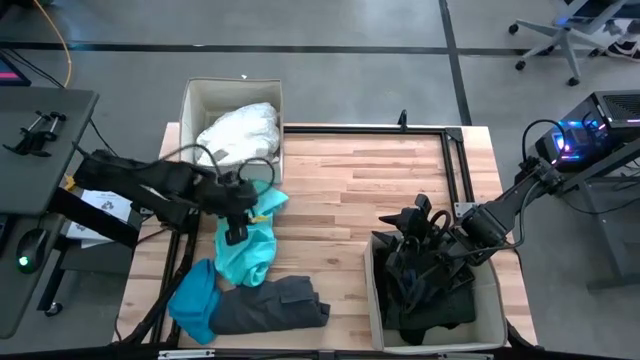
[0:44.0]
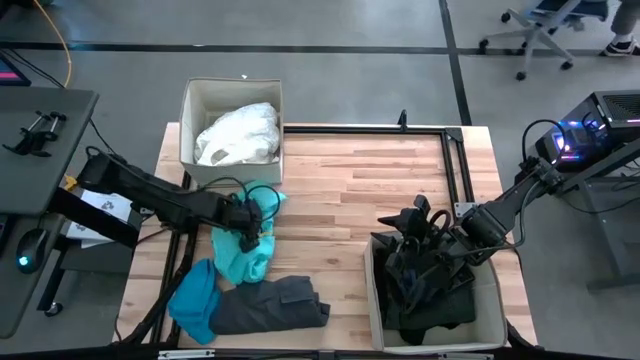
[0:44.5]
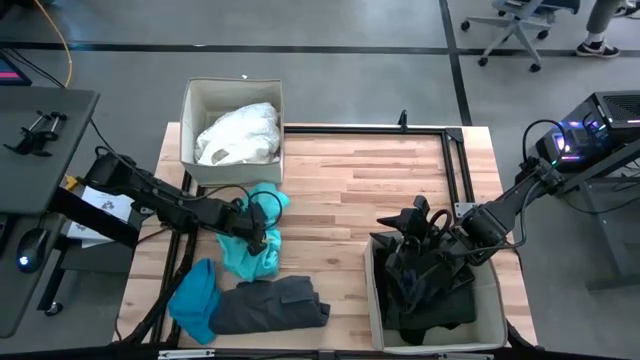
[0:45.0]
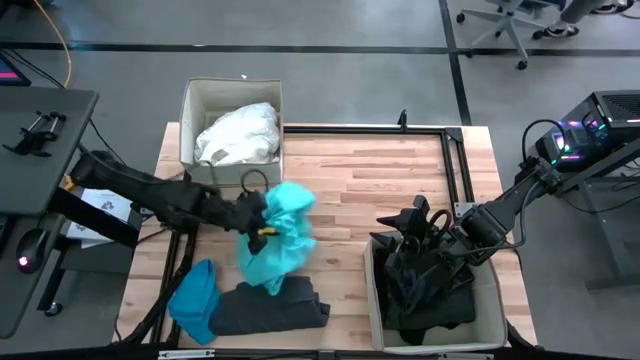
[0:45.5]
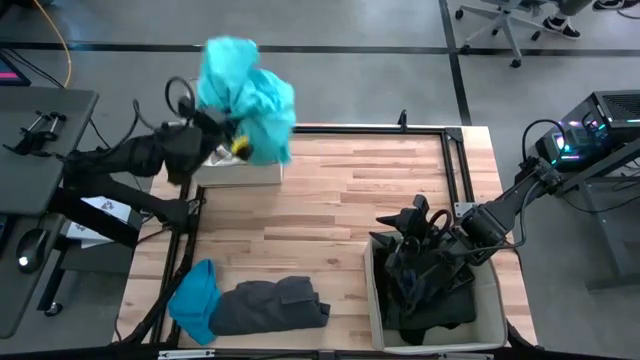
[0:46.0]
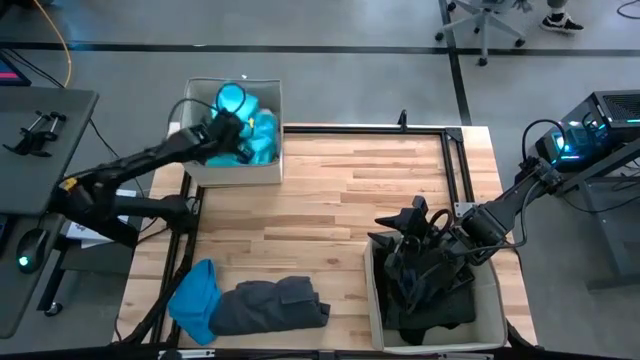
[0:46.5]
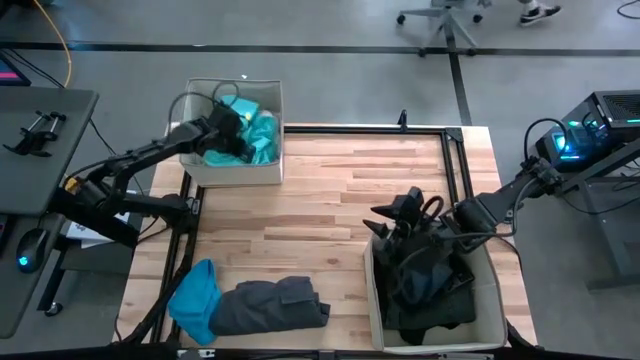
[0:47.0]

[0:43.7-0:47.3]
Task: Sort clothes
Put the light blue shorts into the top laundry organizer

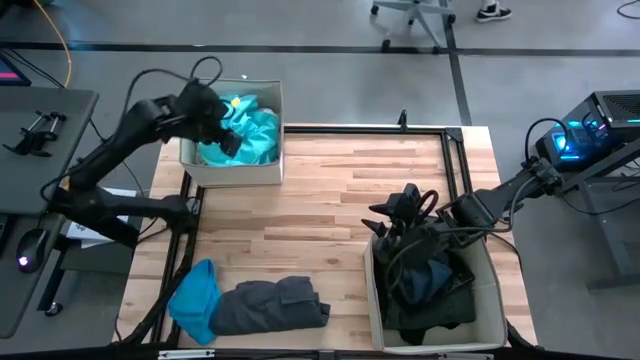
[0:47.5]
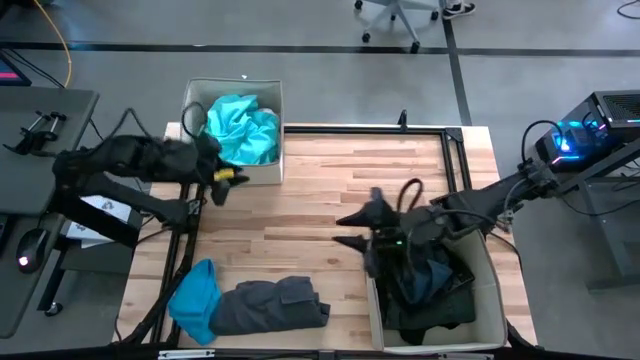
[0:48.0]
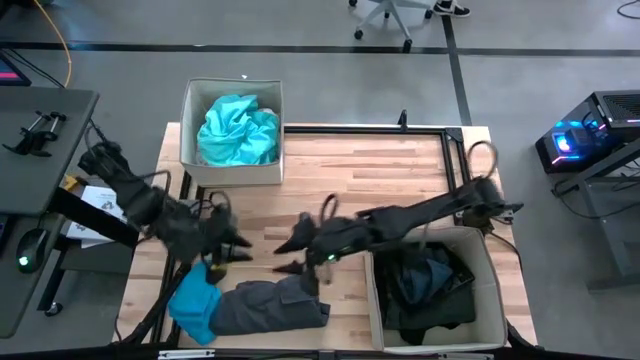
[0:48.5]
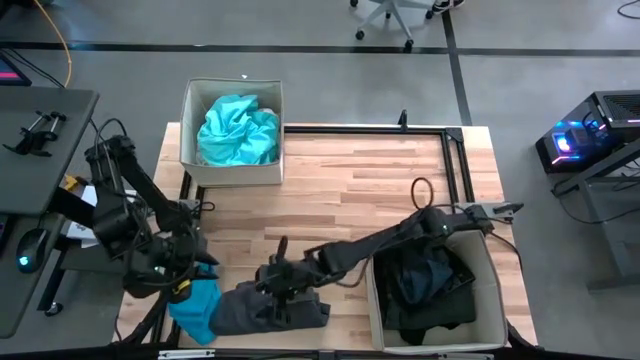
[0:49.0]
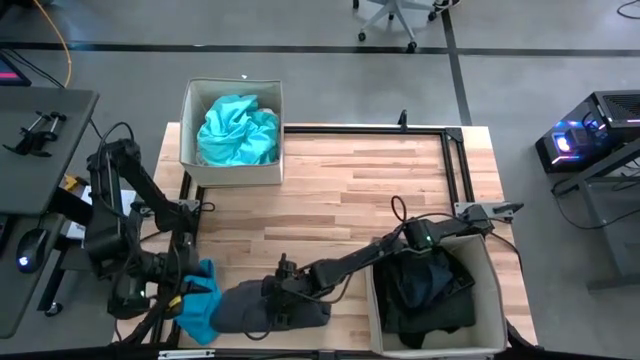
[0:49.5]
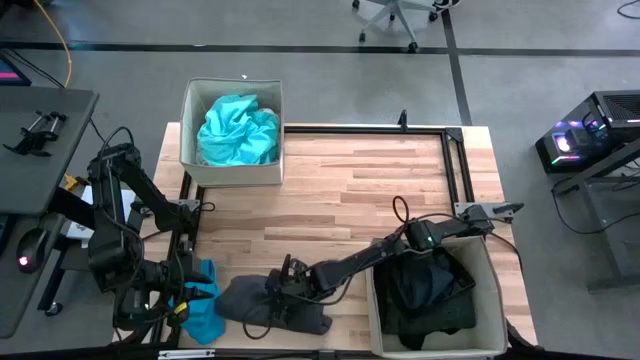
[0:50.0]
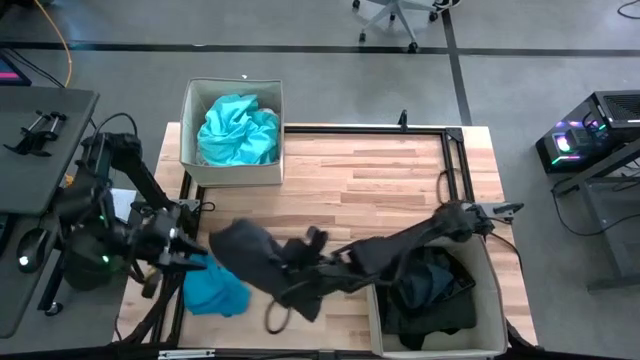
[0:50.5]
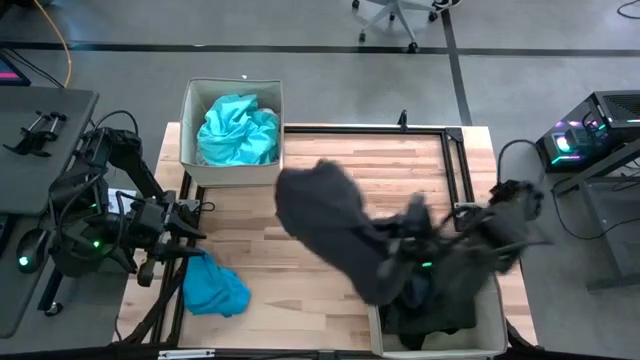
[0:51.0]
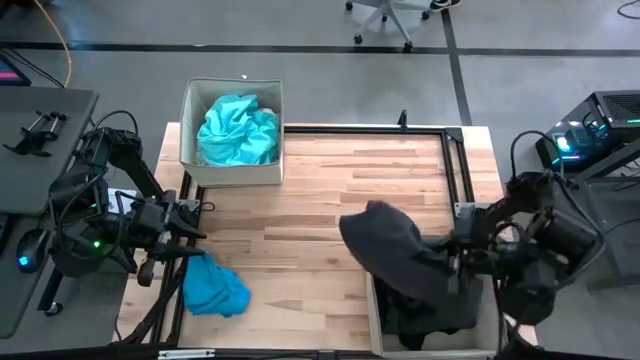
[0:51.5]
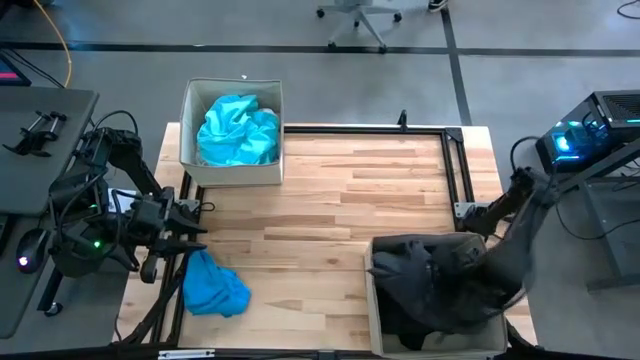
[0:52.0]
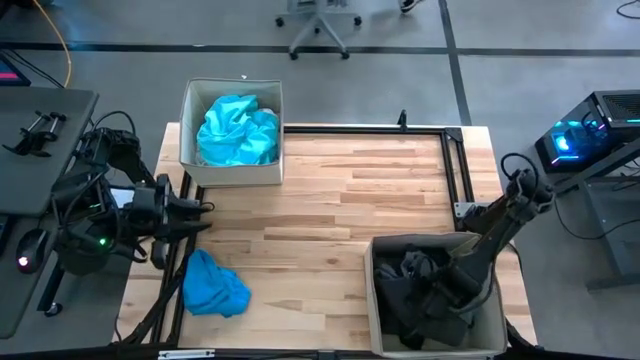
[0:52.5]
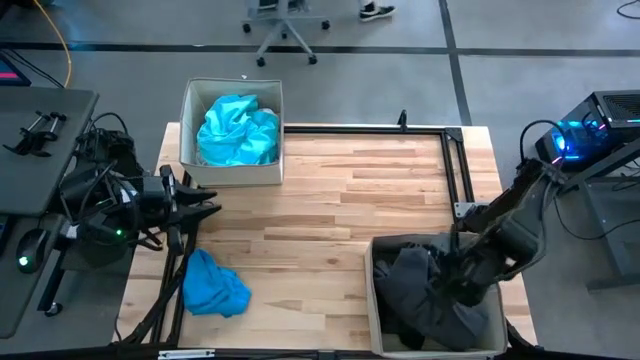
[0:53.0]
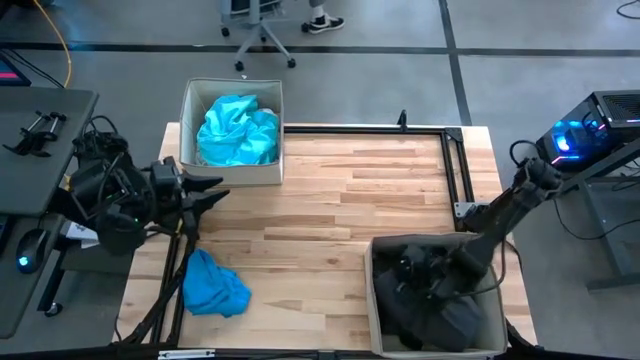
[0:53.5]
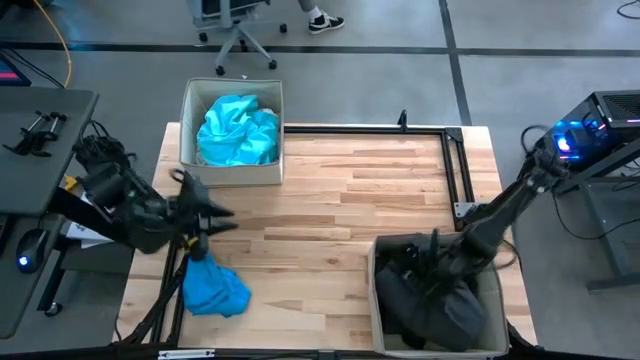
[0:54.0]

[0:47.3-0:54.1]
Put the gray pants into the bottom laundry organizer

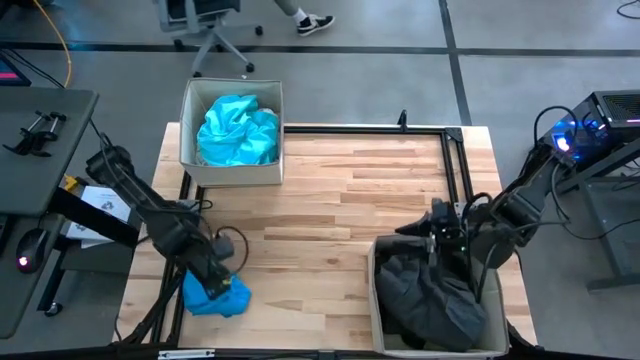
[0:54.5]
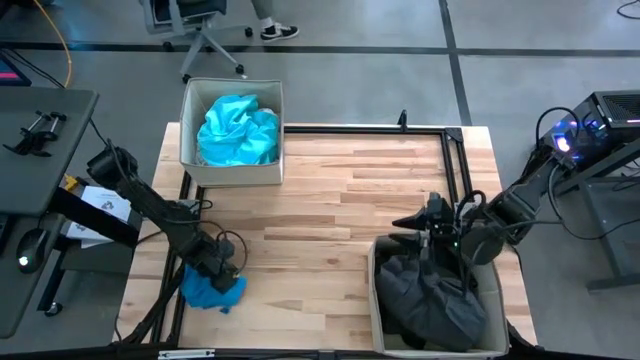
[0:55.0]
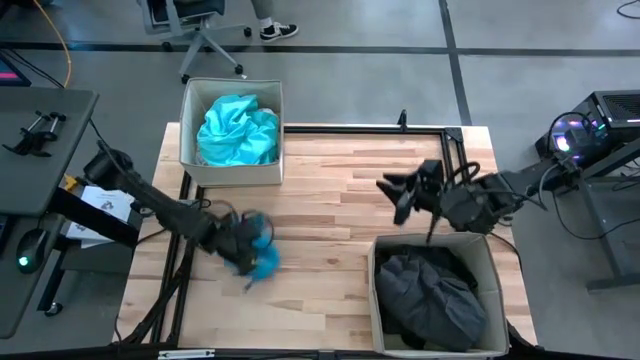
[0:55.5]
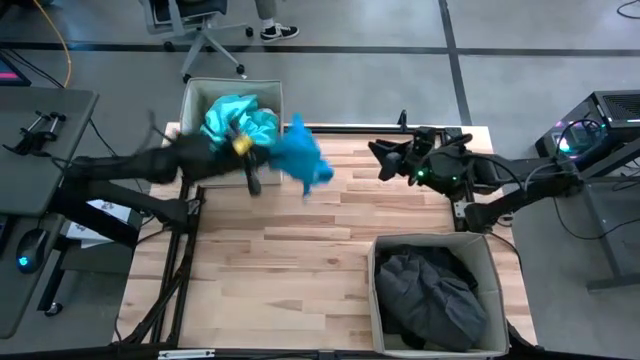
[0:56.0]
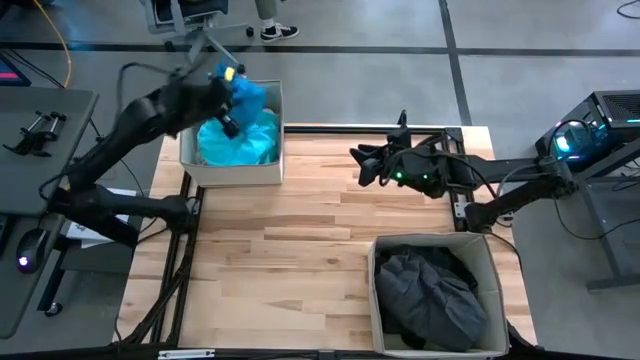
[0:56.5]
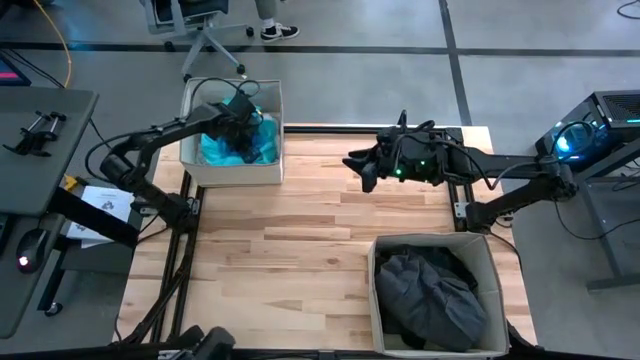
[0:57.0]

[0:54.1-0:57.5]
Put the dark blue shorts into the top laundry organizer

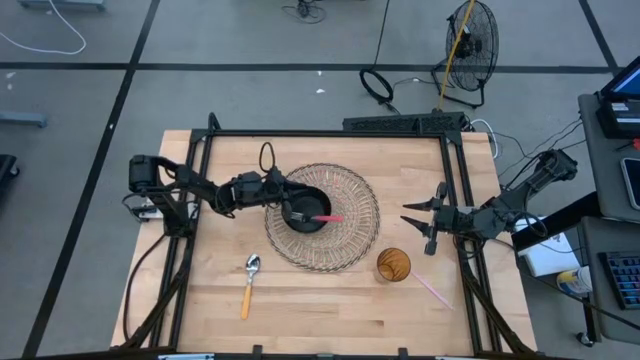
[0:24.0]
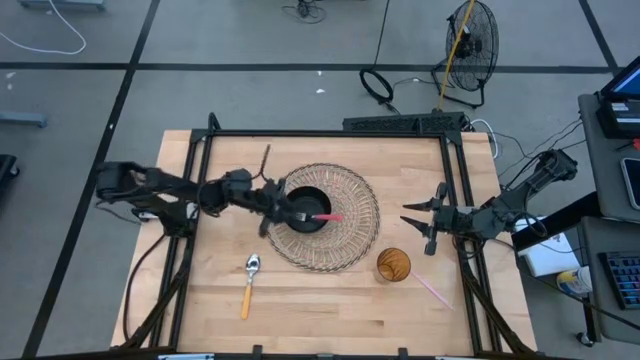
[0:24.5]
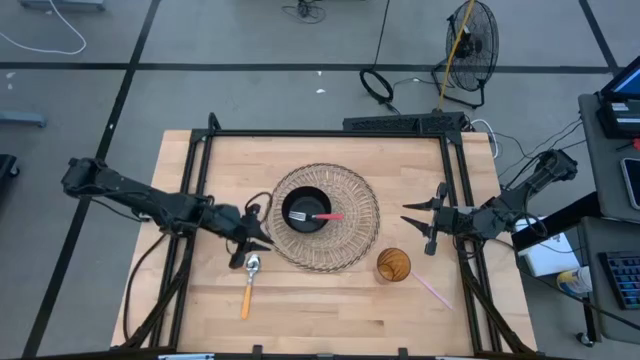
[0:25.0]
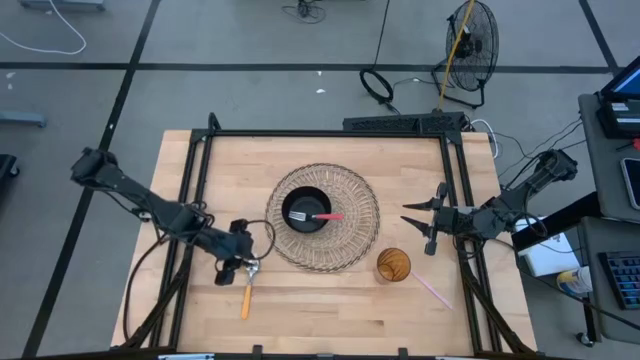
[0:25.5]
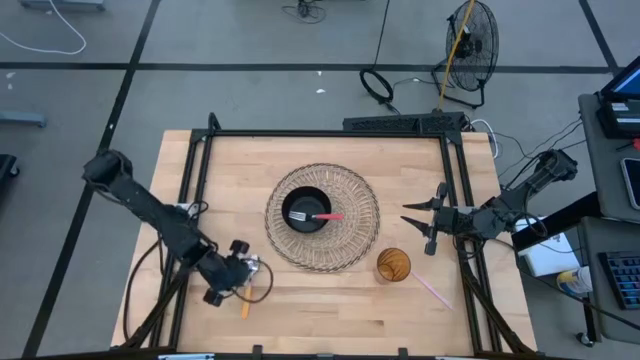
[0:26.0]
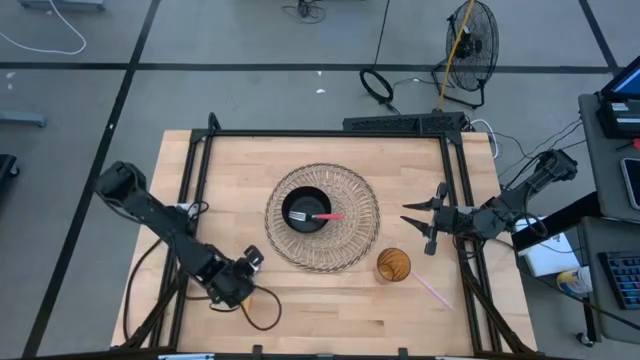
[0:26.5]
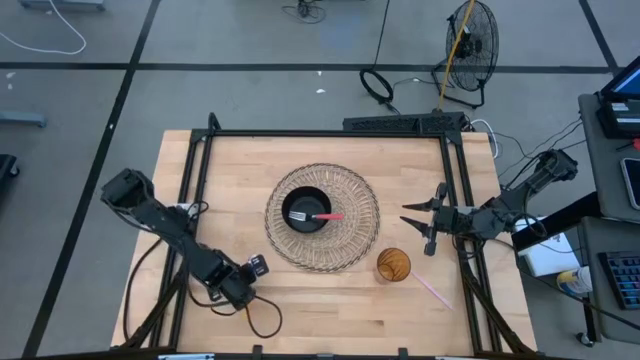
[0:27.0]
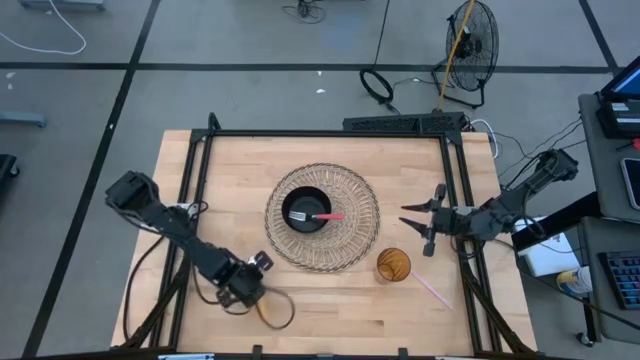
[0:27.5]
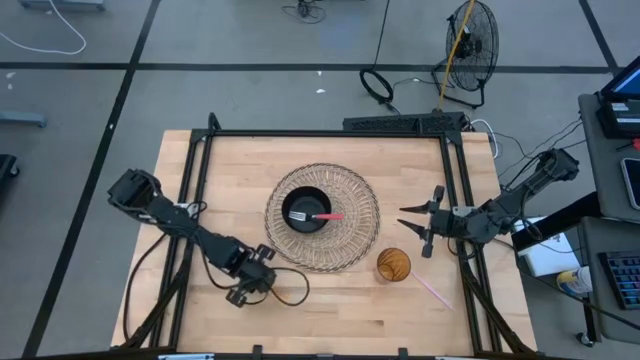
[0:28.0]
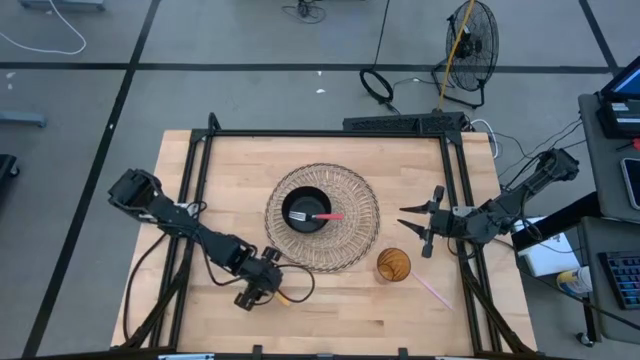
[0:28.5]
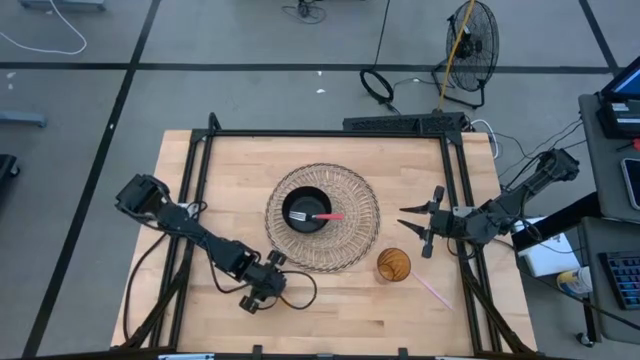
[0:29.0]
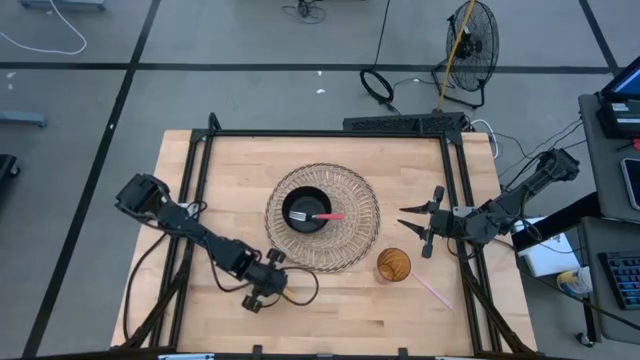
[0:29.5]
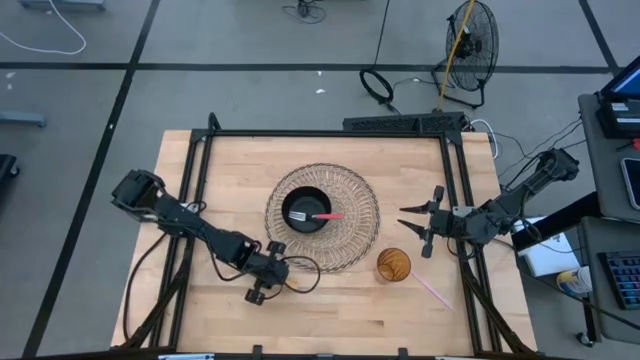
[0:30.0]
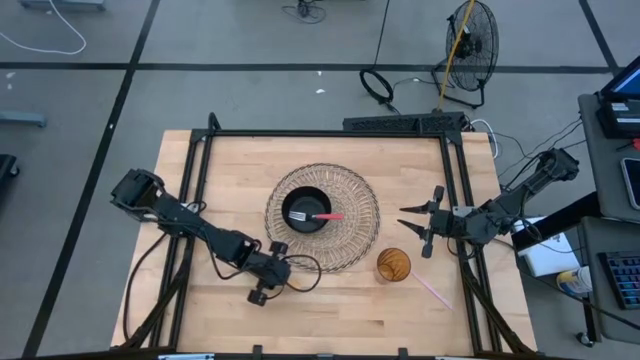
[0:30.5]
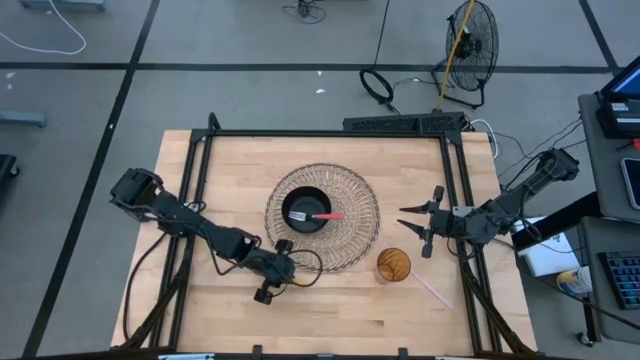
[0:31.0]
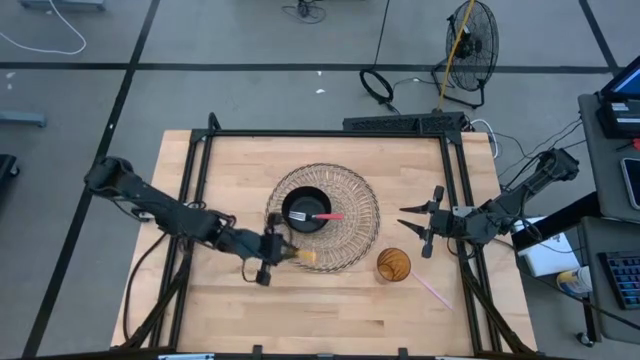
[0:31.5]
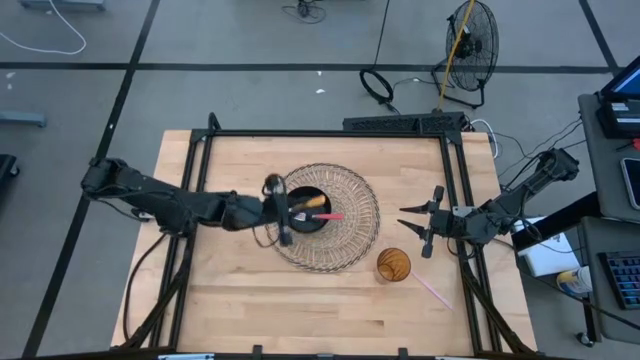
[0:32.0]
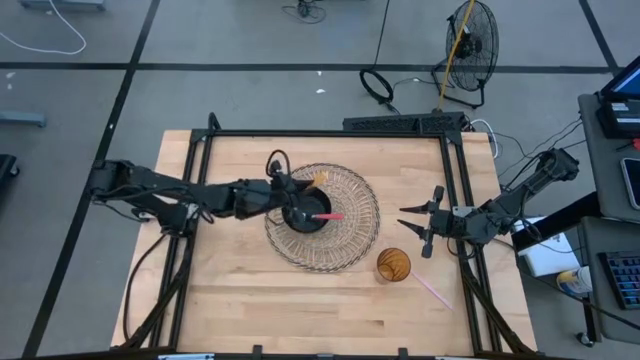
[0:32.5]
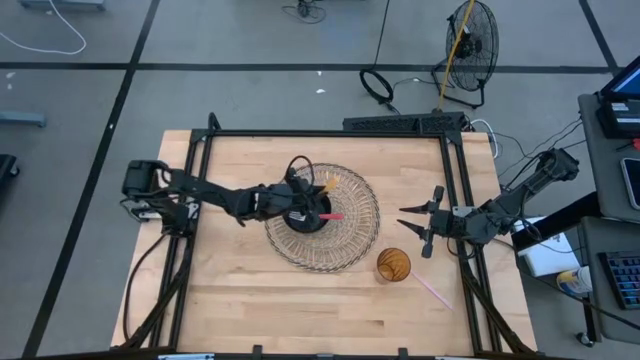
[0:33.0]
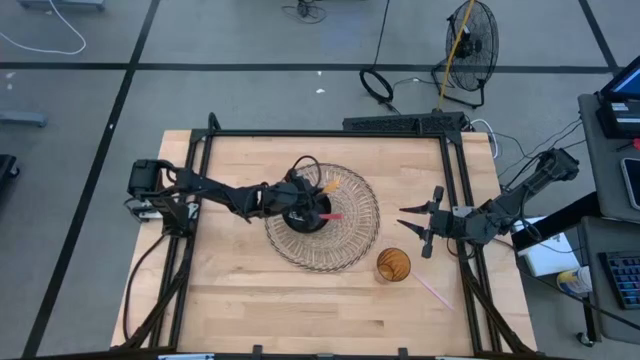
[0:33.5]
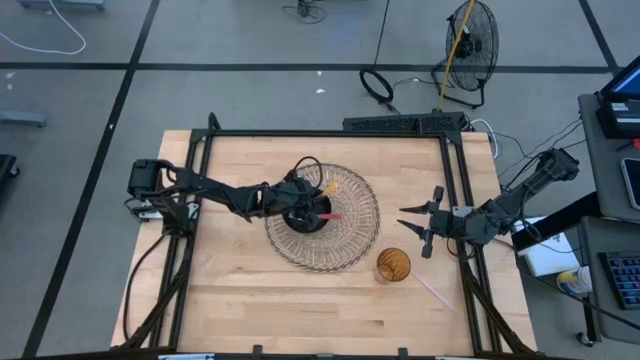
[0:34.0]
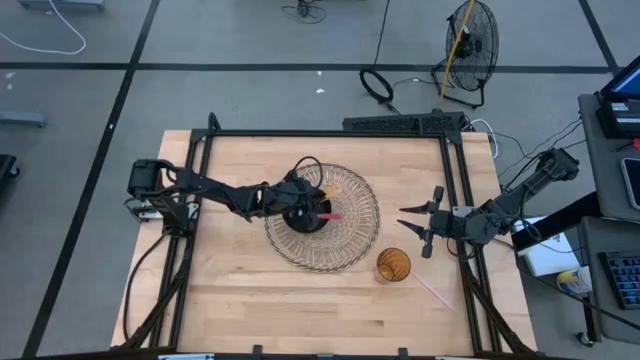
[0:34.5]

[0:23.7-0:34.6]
Task: Pick & Place Utensil
Put the yellow spoon into the black bowl
